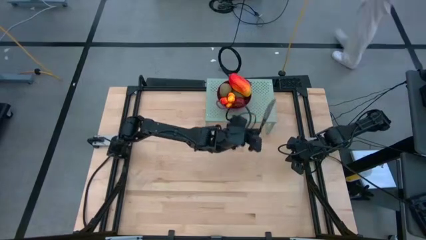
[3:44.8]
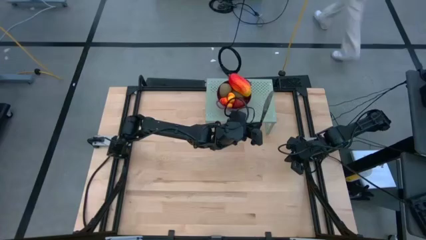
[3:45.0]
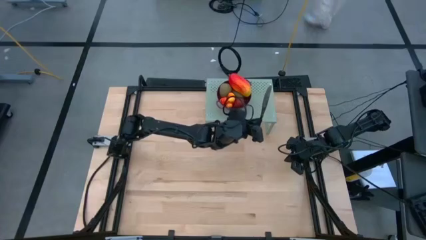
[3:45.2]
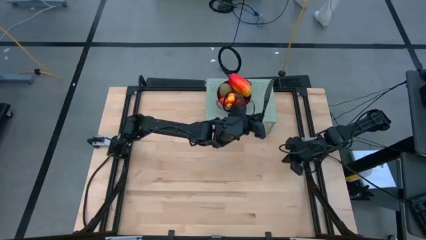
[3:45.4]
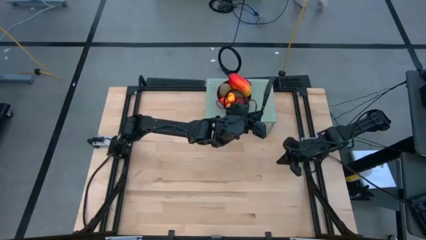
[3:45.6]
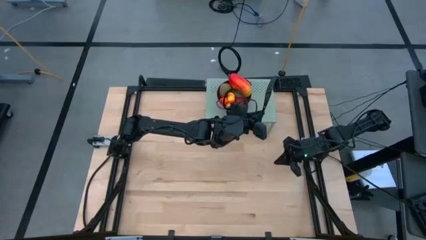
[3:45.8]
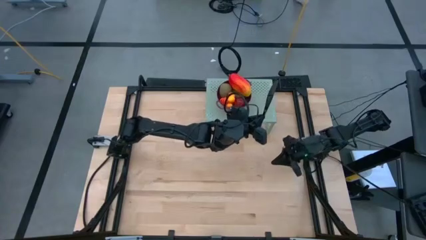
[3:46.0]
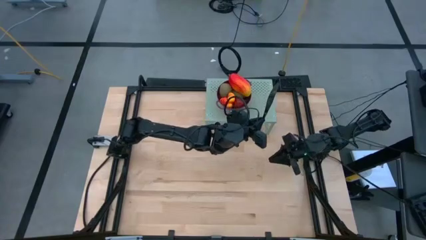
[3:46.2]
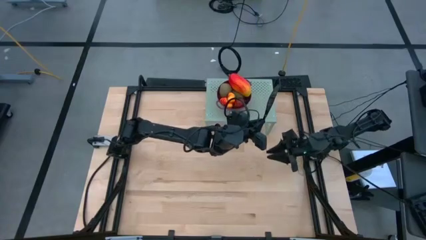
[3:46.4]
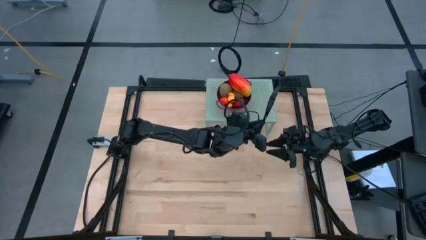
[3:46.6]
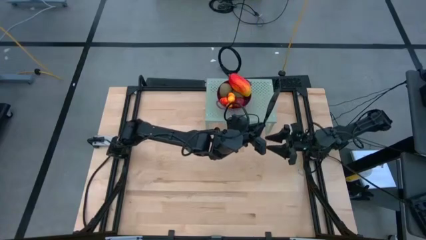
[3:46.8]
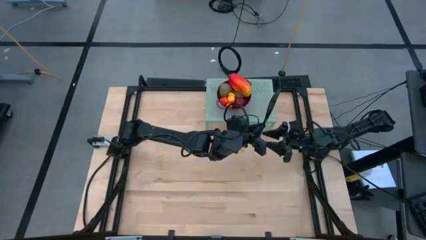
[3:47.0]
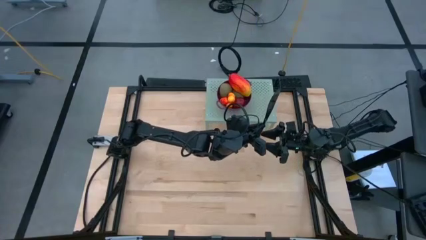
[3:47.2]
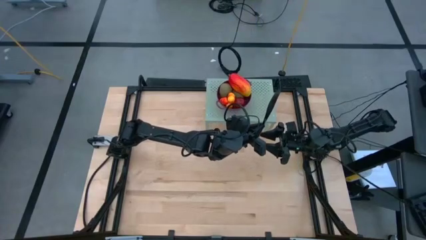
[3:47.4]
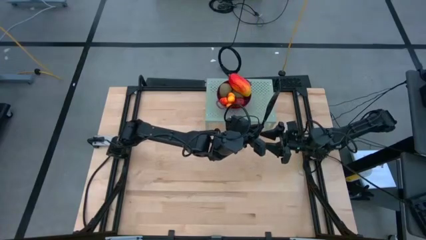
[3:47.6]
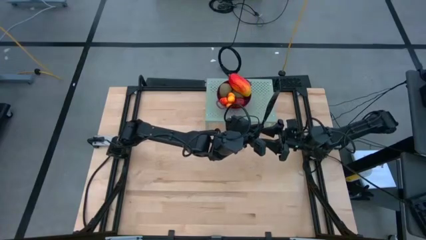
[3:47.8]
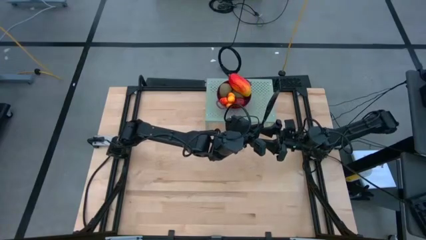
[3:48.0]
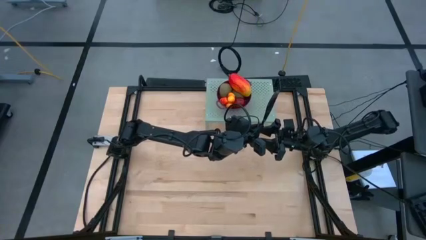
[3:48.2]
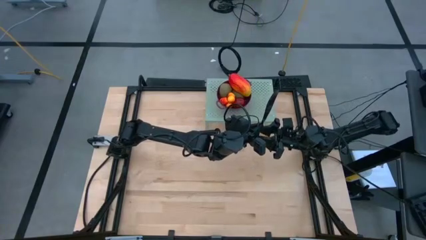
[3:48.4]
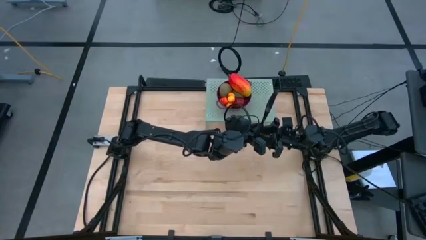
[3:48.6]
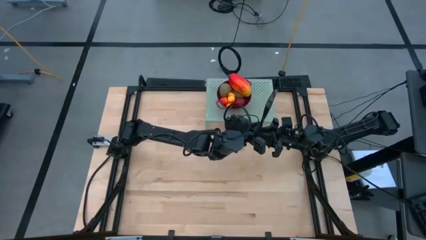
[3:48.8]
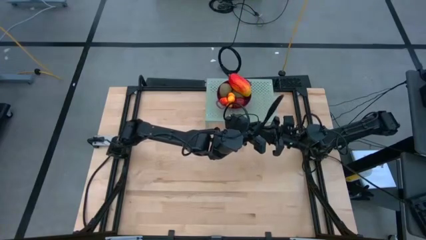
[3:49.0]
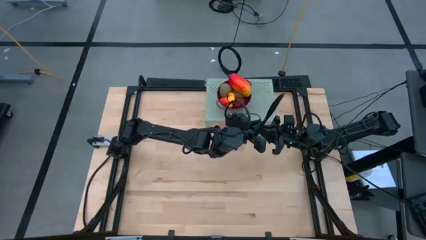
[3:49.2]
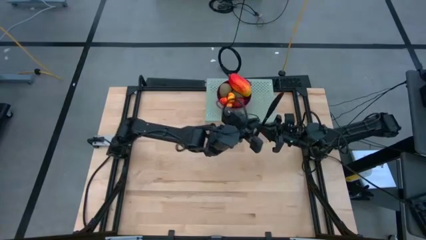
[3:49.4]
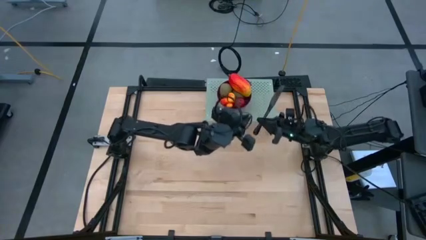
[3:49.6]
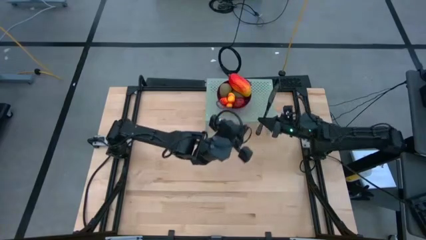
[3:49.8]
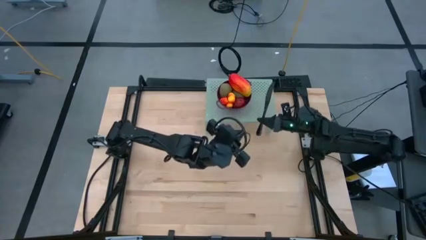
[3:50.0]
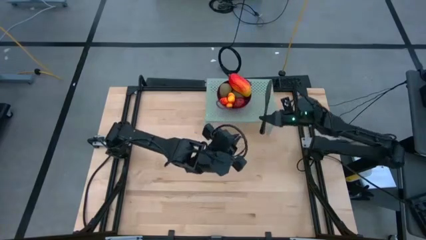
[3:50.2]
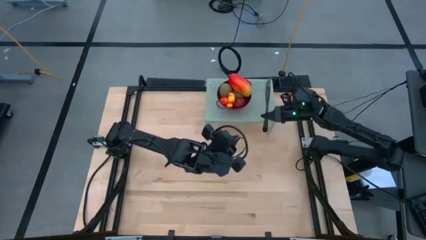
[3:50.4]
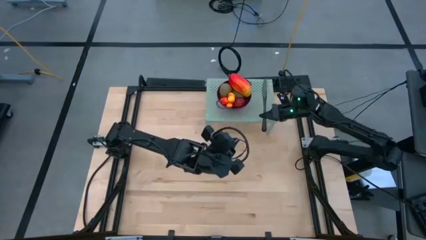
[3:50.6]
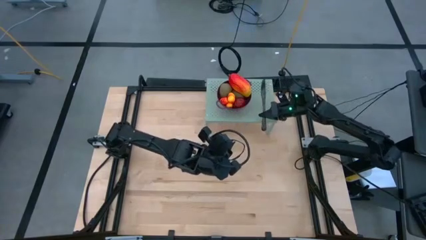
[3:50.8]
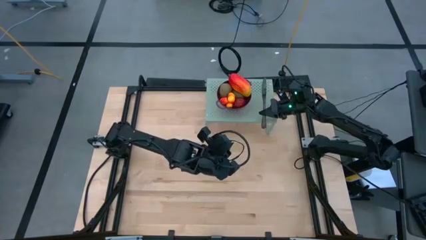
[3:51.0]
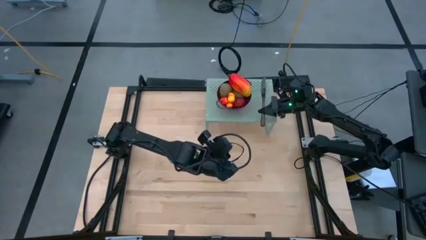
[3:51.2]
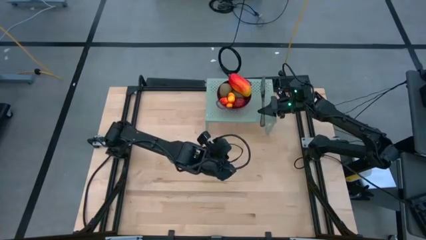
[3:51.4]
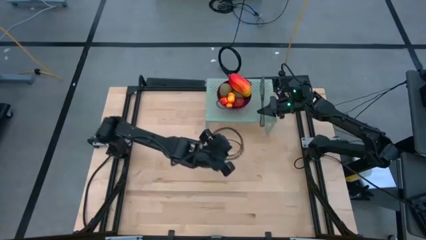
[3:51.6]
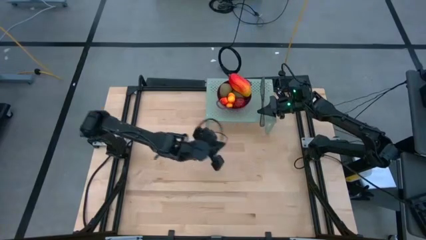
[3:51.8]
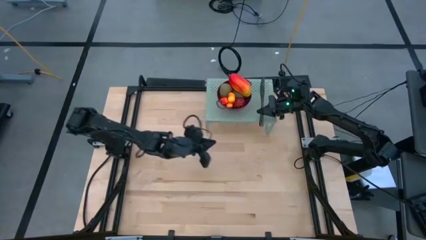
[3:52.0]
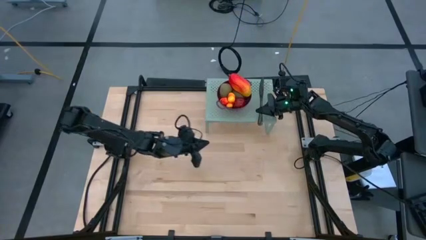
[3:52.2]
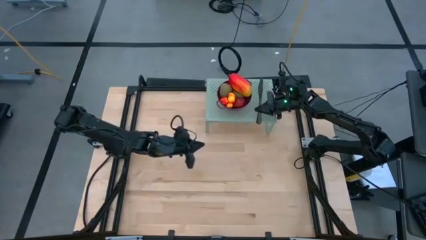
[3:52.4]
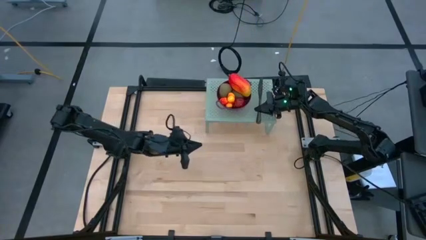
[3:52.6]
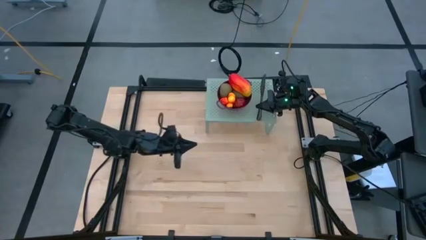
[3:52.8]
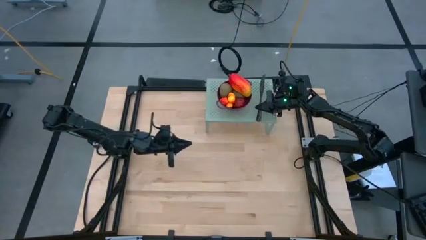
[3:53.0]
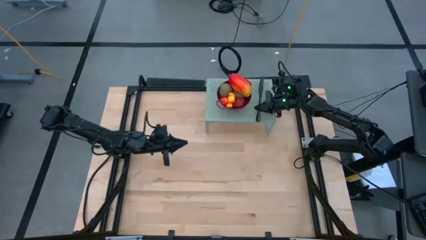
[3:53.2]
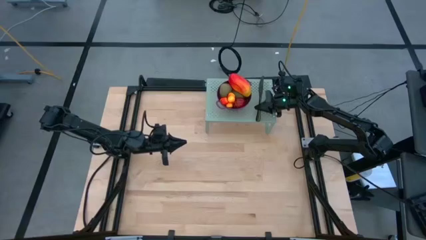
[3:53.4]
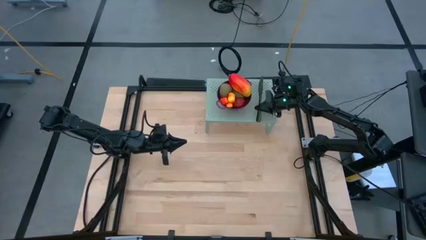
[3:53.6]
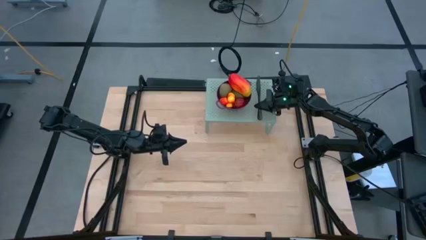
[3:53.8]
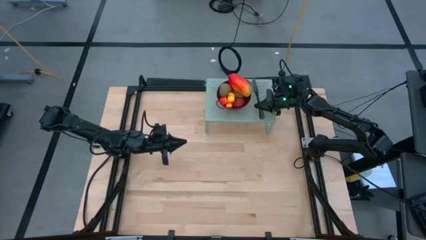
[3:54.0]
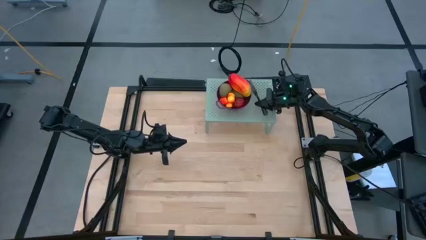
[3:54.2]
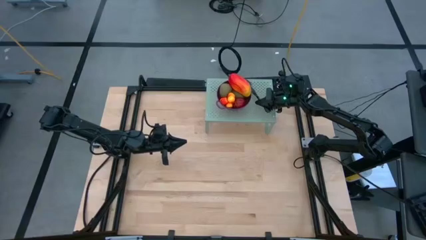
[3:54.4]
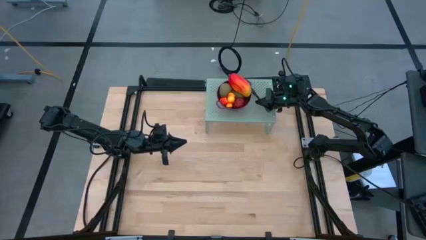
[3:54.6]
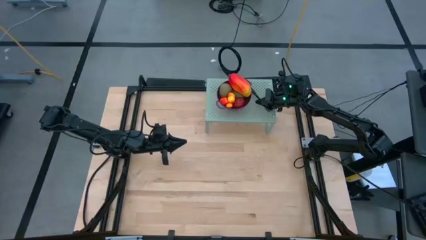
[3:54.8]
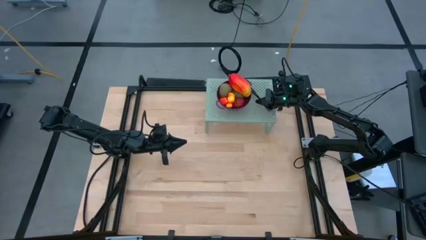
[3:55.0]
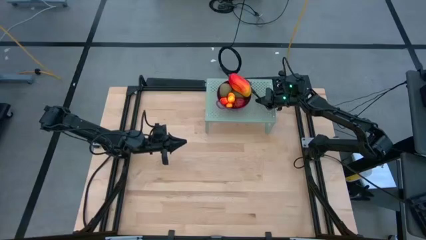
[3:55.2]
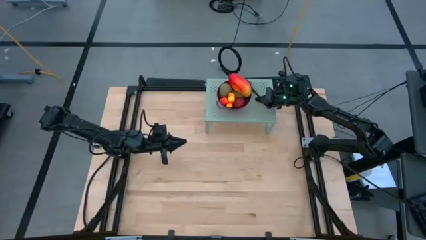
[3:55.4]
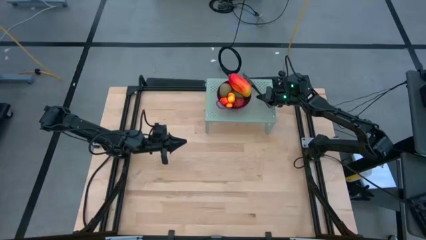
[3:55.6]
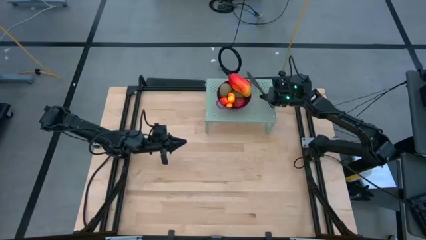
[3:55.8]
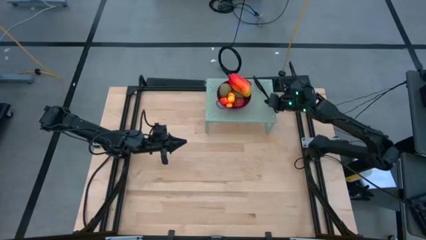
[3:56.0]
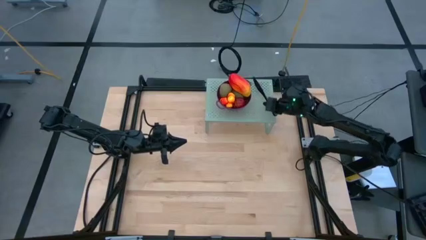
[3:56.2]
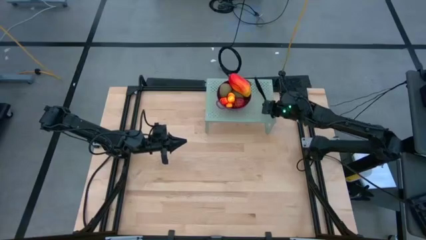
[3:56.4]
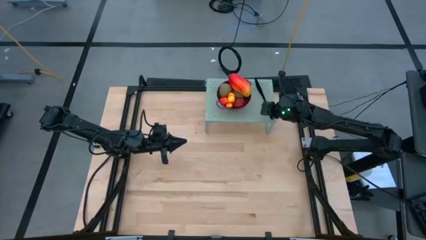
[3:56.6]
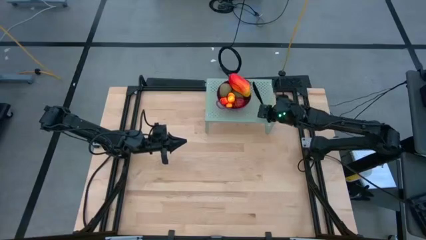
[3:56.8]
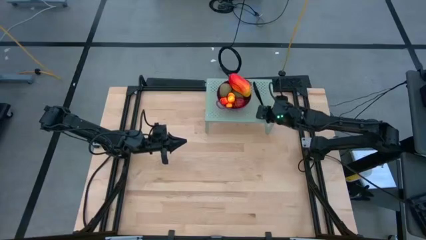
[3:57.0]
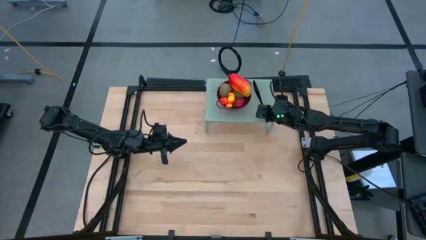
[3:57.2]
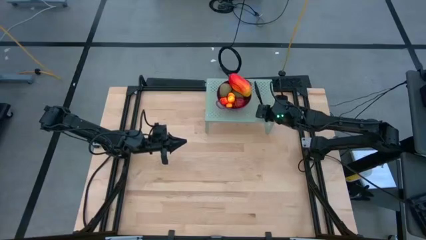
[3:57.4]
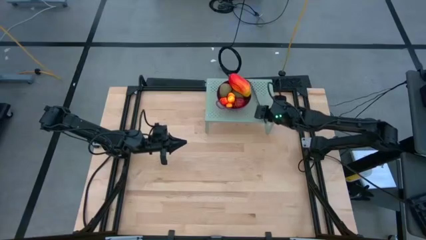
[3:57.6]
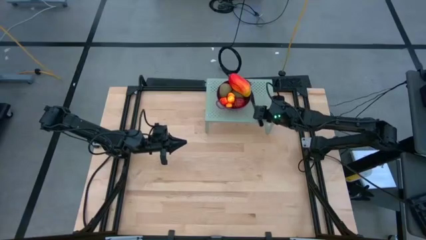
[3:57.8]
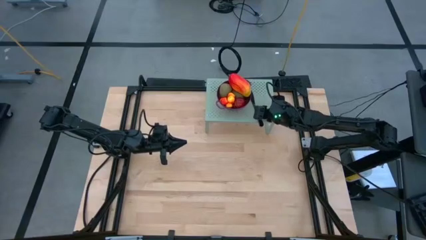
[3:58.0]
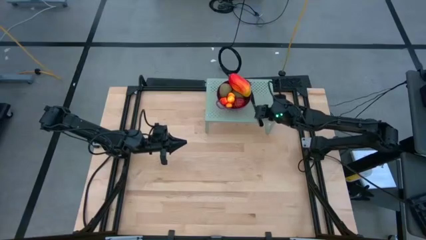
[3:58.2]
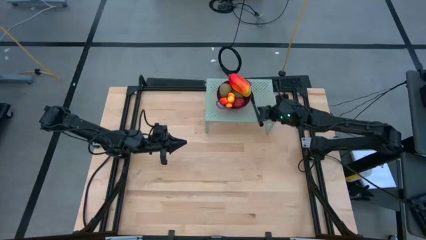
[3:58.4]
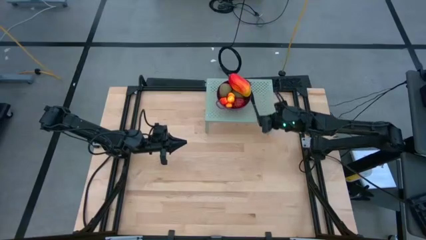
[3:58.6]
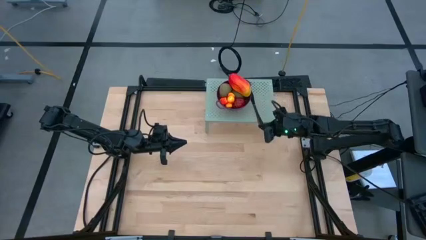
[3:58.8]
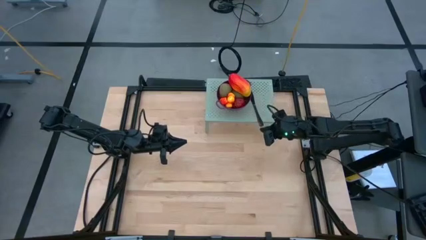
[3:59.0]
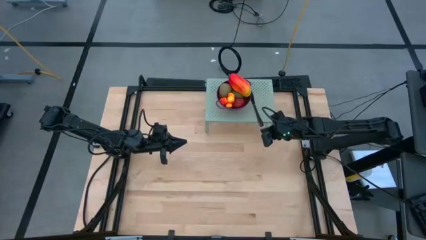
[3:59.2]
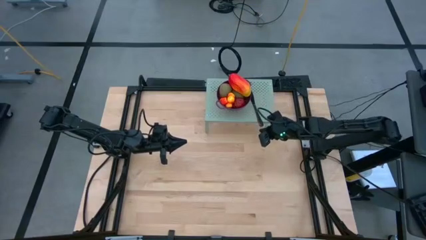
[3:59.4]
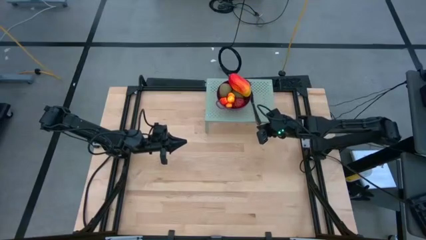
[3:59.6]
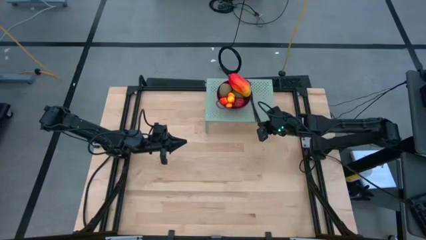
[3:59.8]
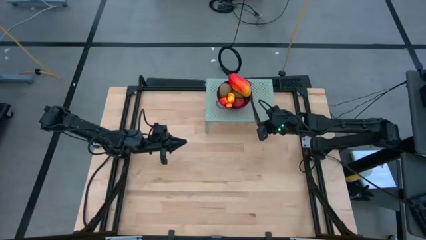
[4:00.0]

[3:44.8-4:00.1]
Task: Pick & Place Fruit
Put the knife on the shelf

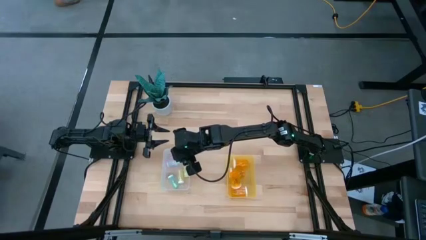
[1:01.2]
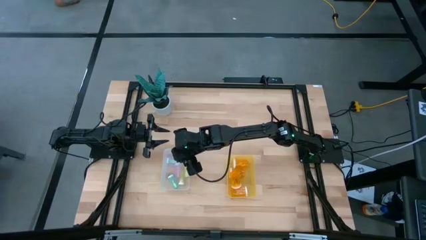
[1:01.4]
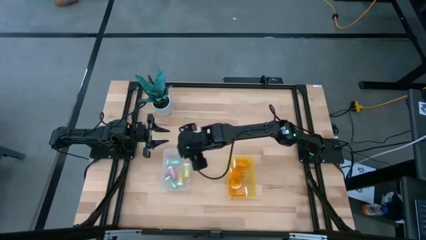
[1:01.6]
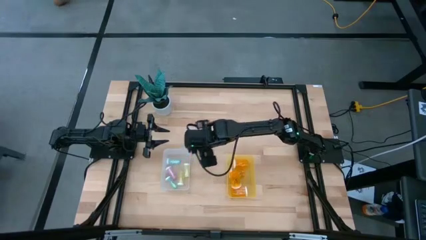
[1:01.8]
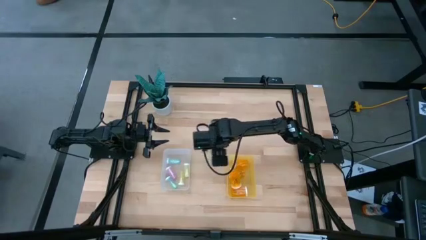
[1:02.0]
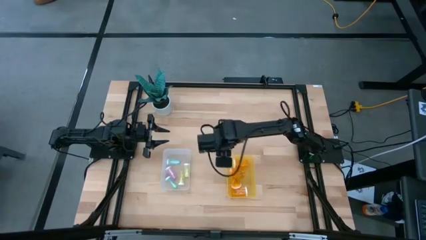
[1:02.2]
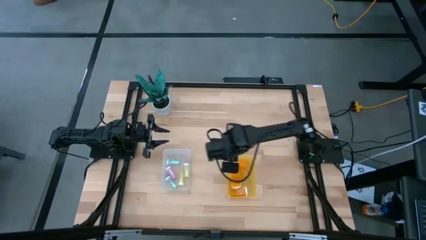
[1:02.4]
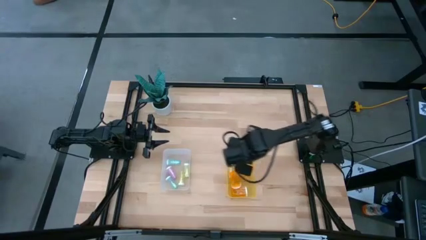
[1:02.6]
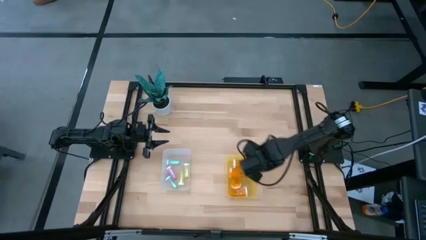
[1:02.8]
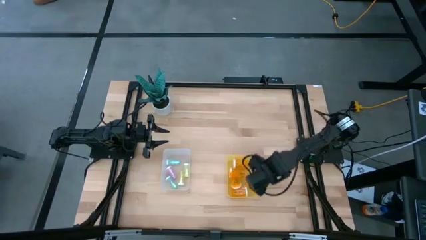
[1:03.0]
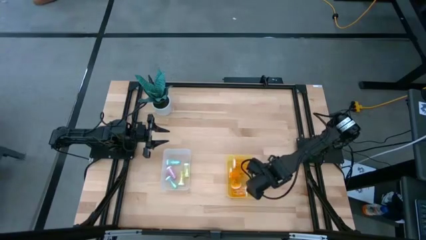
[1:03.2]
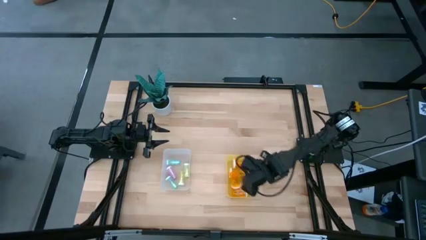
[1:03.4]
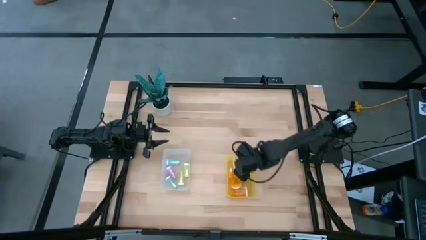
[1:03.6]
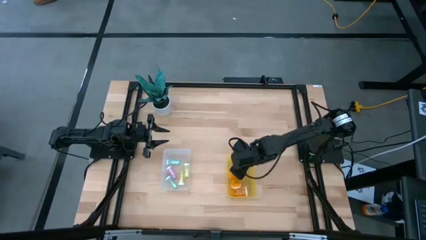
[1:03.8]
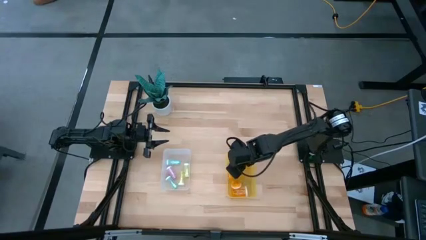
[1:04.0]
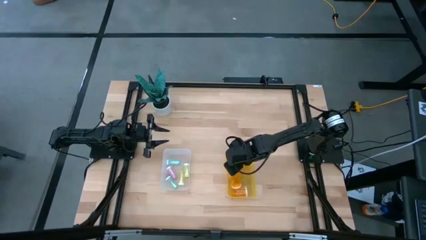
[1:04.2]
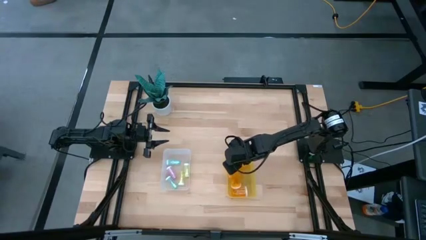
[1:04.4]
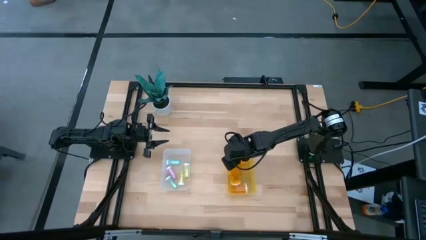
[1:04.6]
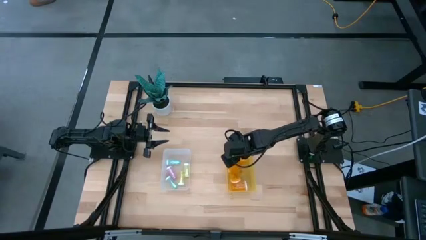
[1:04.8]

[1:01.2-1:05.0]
Task: Pick and place medicine bottles into bin by pill shape (circle, oval)
Move the yellow bin to the top
